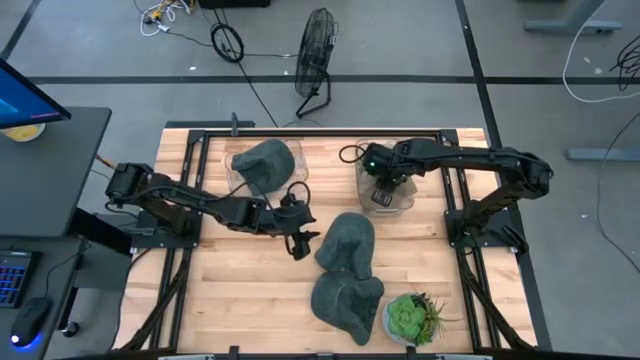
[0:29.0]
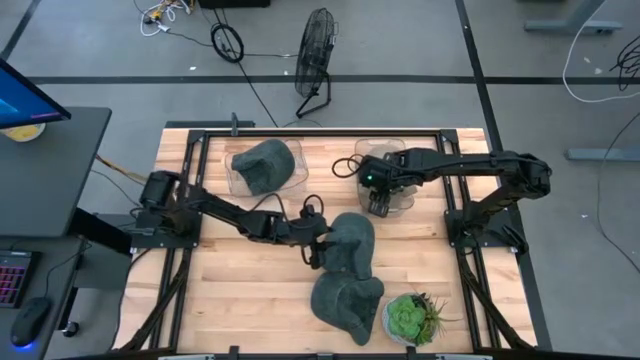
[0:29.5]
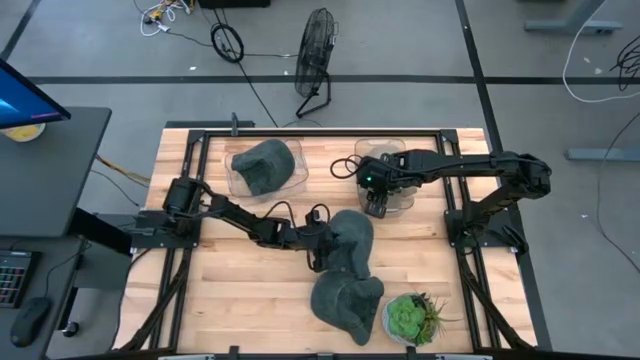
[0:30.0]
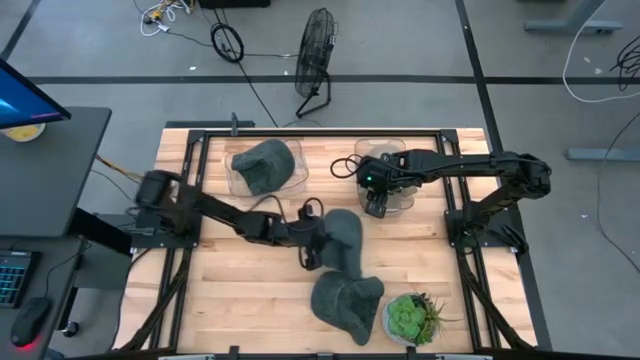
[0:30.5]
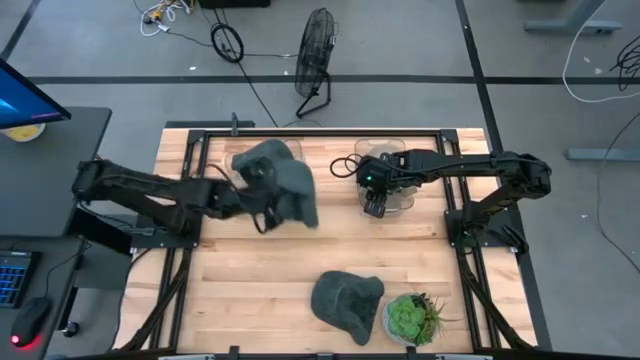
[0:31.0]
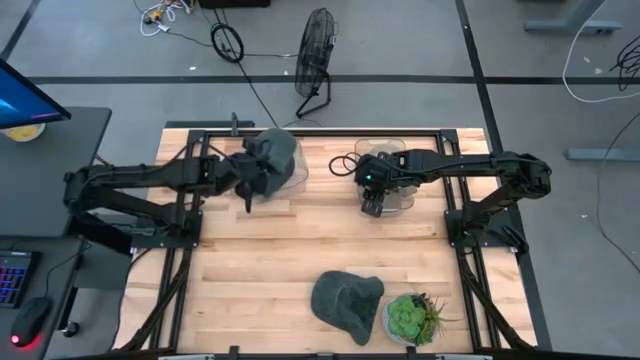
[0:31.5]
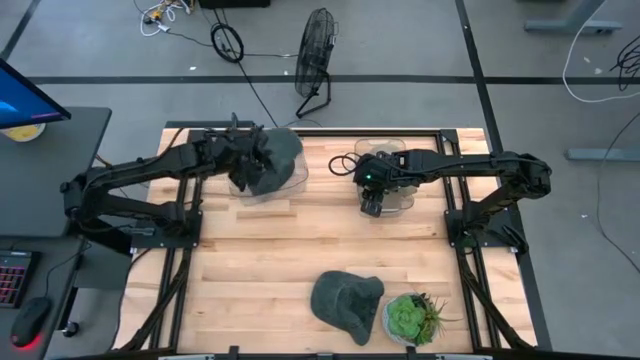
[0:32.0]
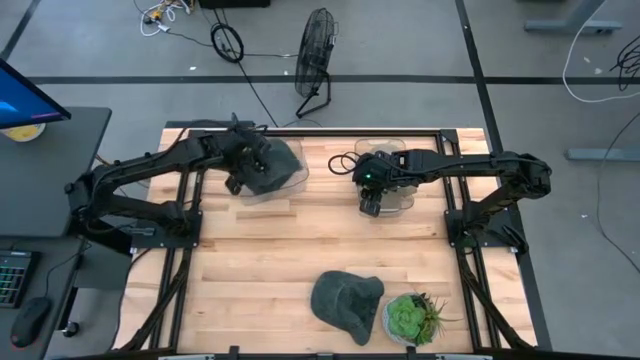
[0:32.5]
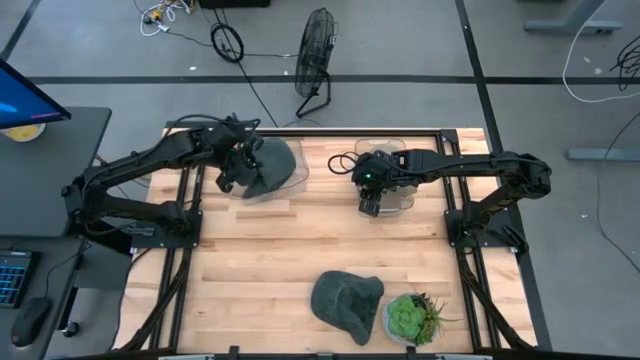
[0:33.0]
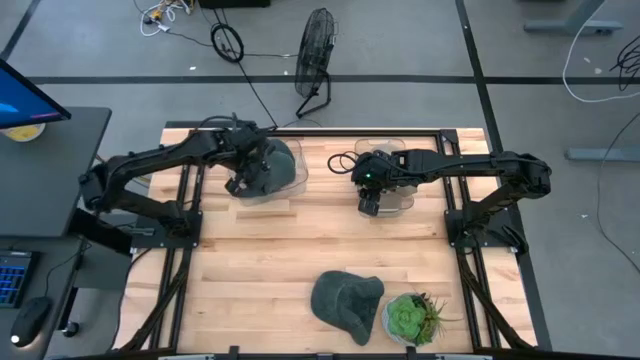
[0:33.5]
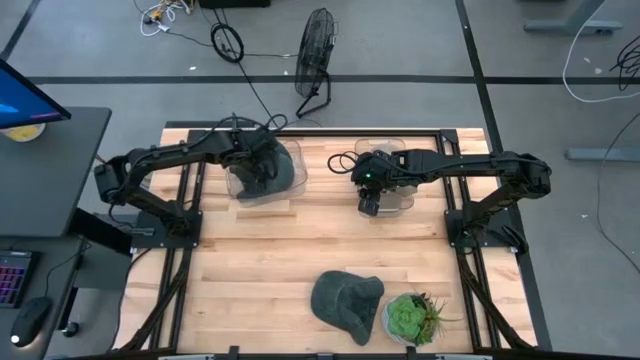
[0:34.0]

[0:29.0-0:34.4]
Task: Pick & Place hat
Put the top black cap into the left transparent bin

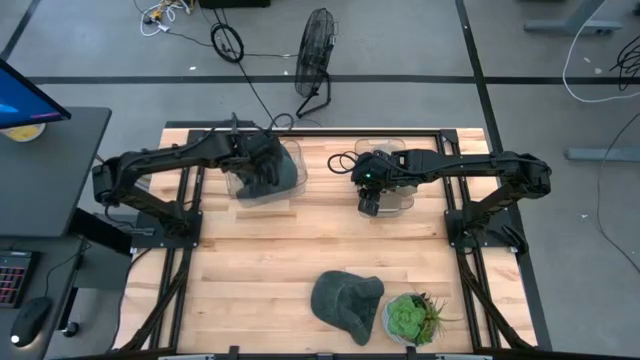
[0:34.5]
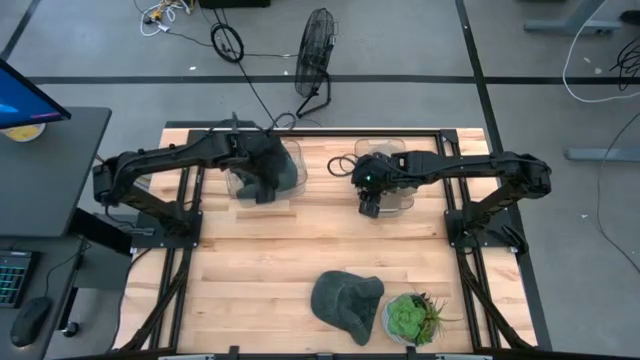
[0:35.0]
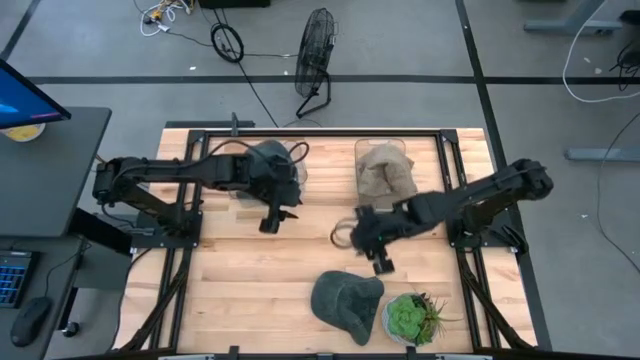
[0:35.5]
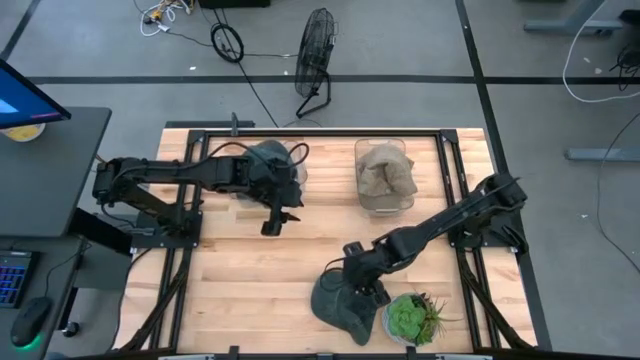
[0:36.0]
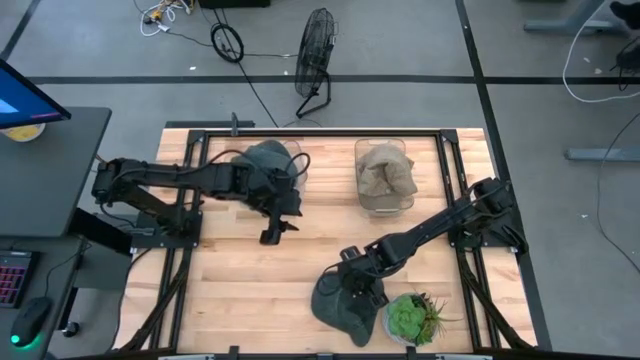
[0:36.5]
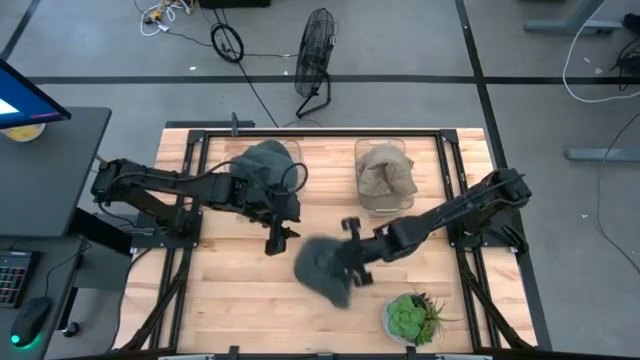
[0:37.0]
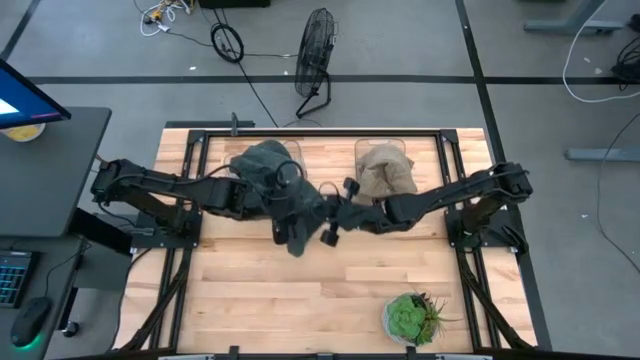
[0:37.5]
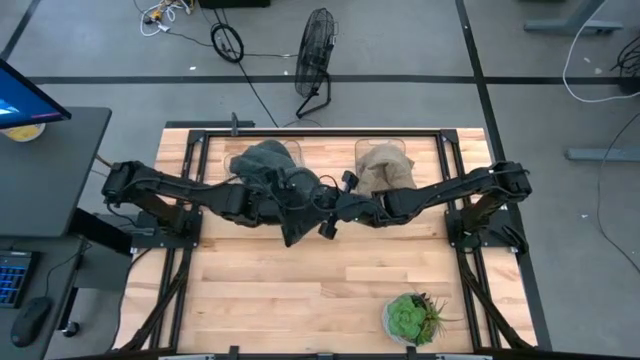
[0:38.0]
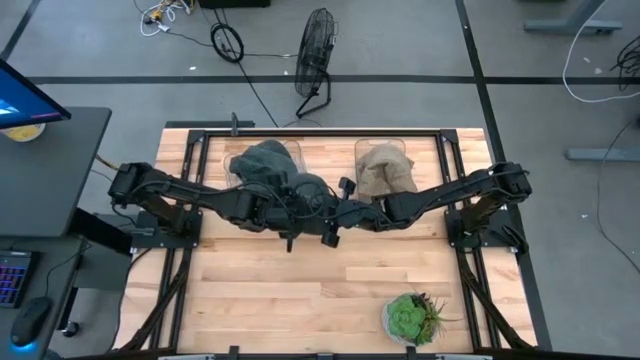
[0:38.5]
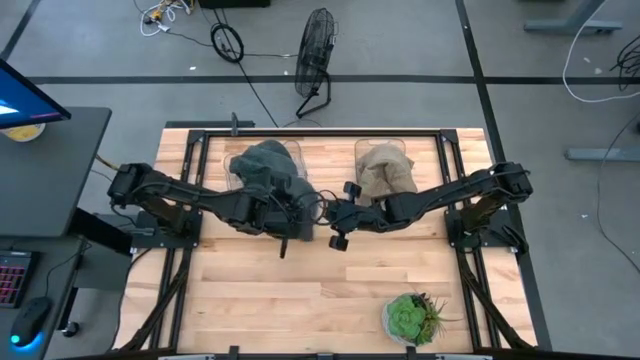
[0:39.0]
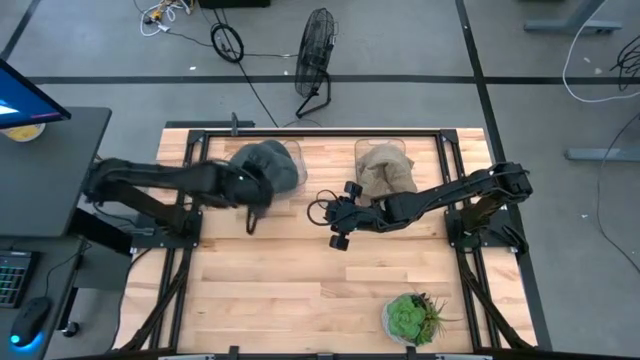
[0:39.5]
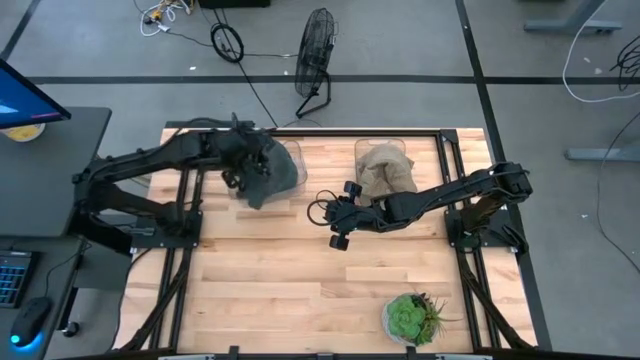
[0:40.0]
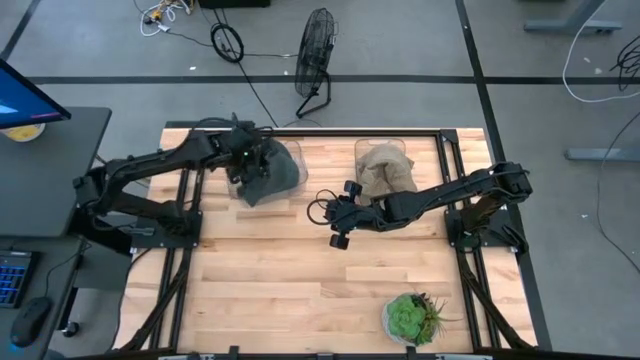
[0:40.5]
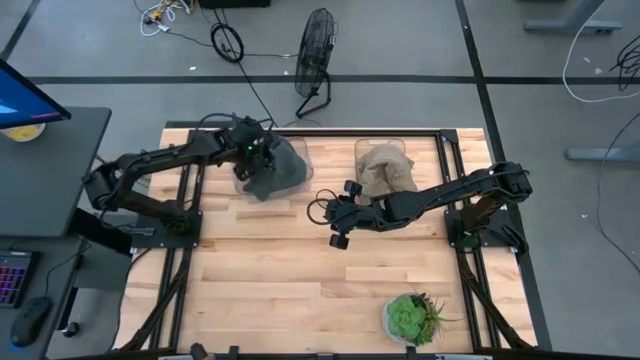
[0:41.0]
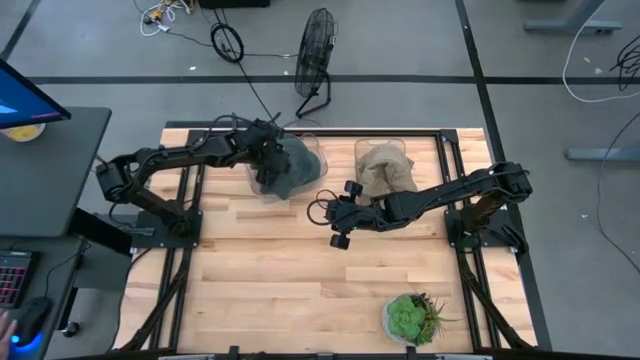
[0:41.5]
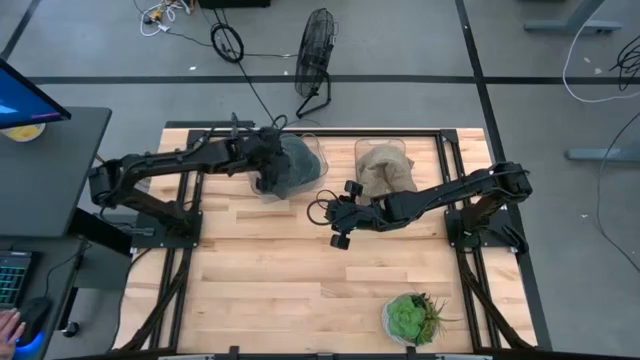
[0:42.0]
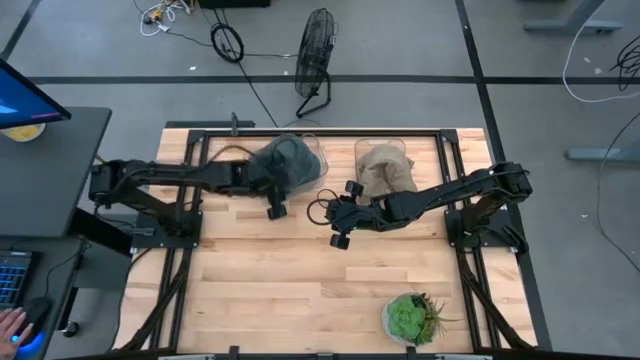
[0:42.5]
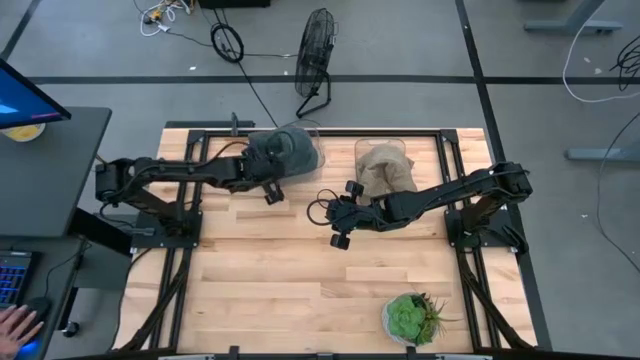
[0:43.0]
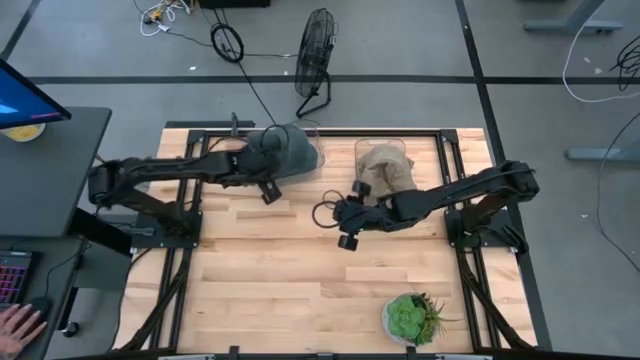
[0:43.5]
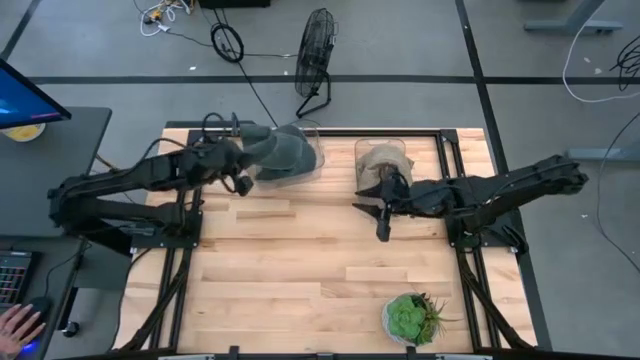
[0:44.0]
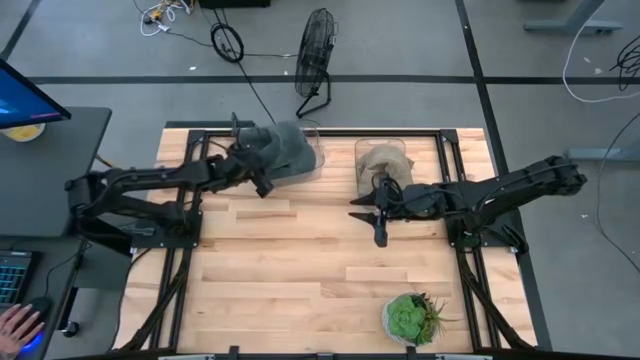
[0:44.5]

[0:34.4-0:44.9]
Put the black cap into the left transparent bin

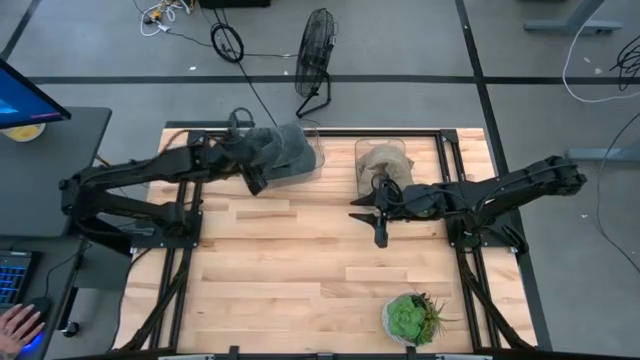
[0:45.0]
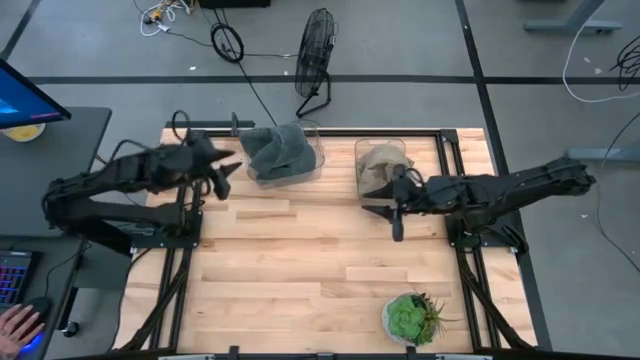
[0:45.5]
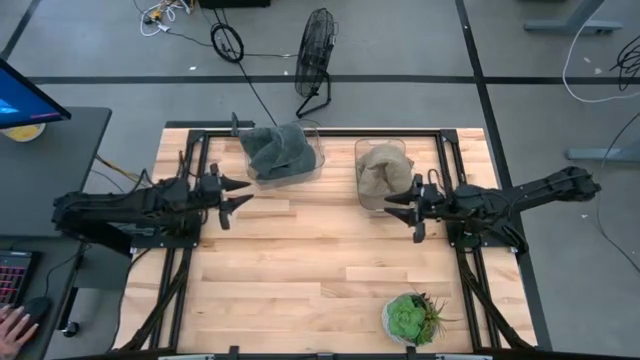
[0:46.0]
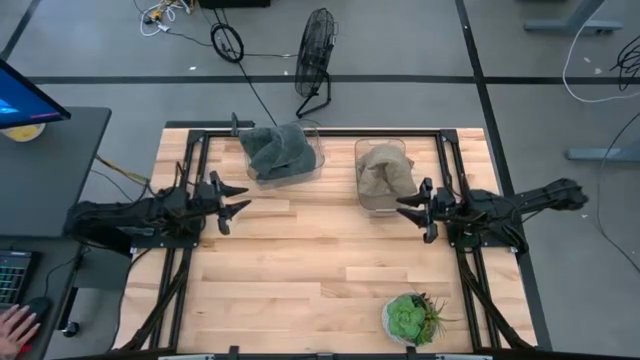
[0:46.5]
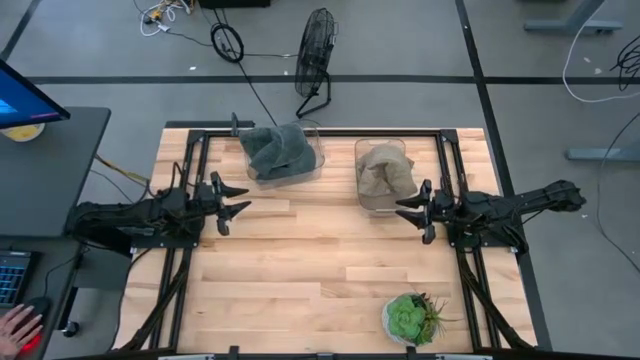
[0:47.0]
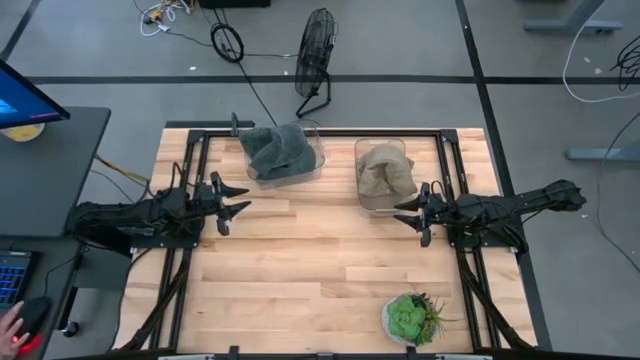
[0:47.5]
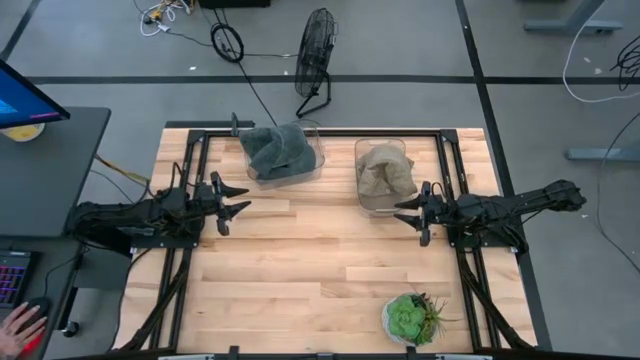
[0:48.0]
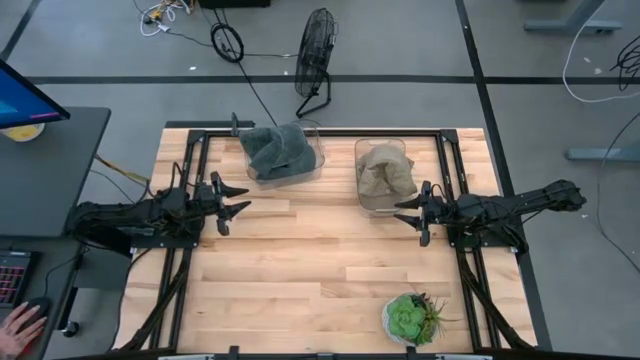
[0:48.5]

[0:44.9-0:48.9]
Return to Home Position
